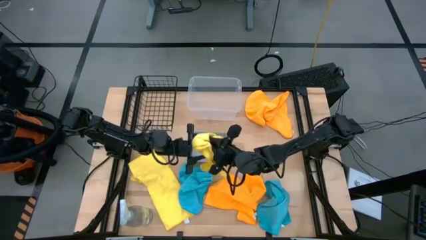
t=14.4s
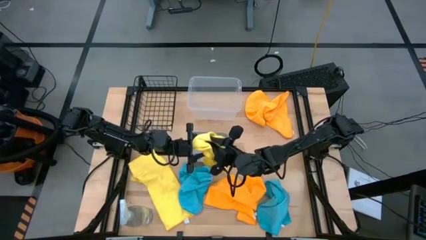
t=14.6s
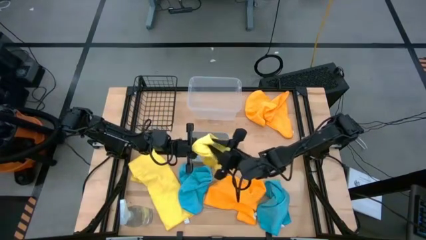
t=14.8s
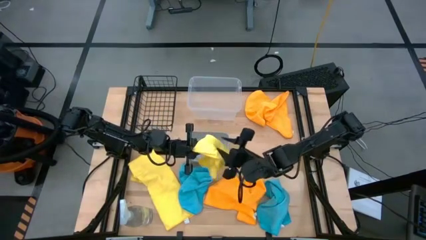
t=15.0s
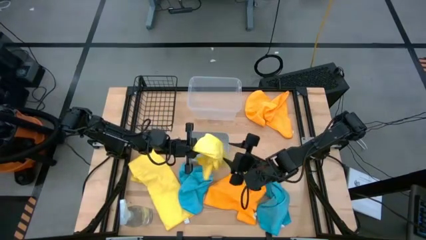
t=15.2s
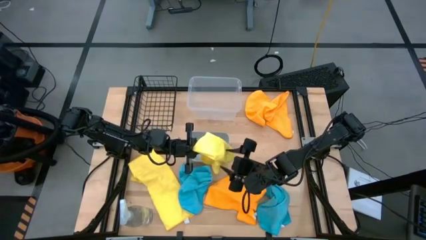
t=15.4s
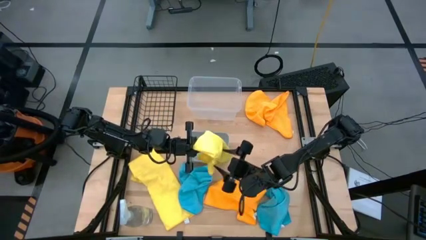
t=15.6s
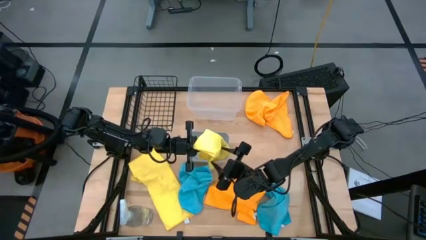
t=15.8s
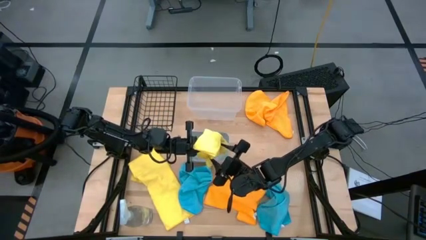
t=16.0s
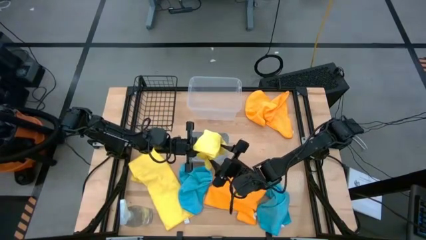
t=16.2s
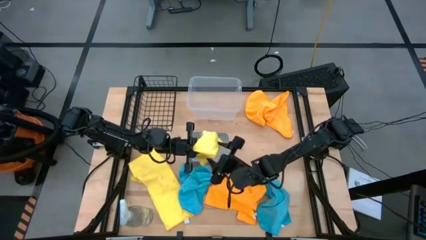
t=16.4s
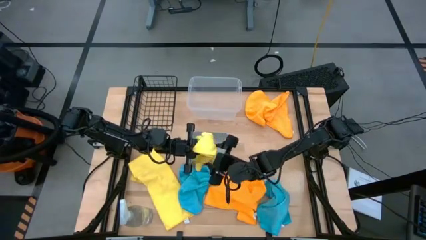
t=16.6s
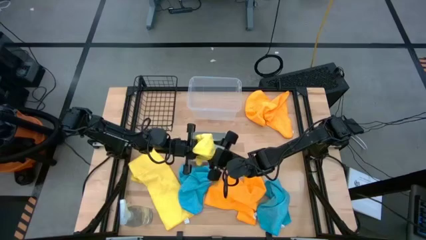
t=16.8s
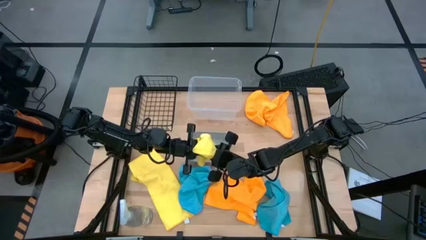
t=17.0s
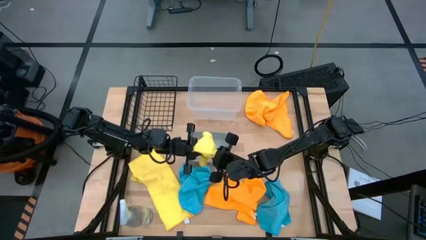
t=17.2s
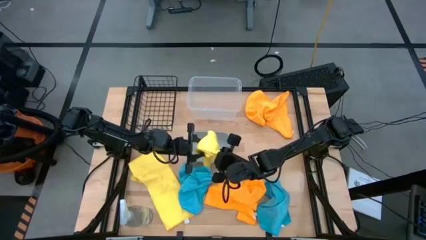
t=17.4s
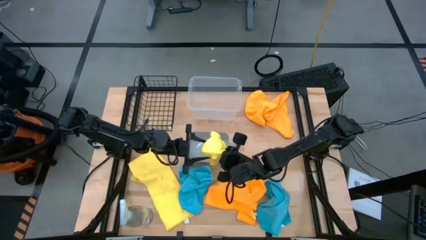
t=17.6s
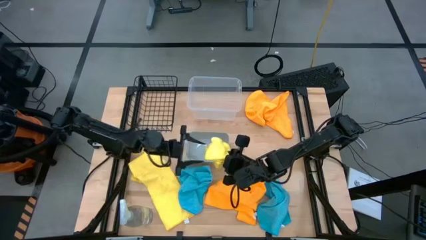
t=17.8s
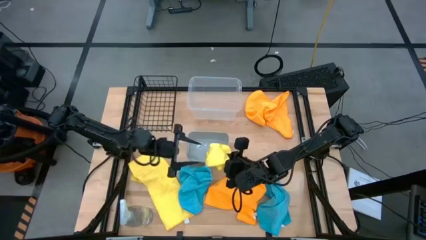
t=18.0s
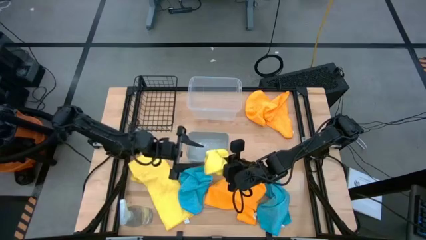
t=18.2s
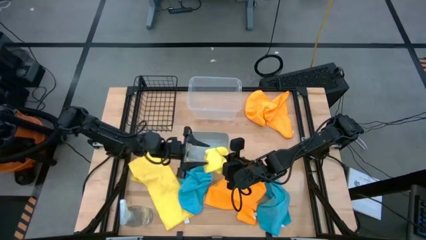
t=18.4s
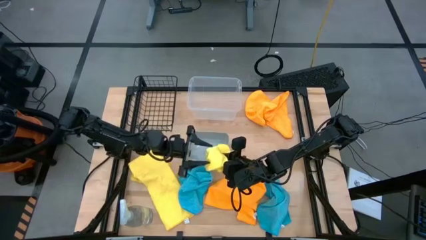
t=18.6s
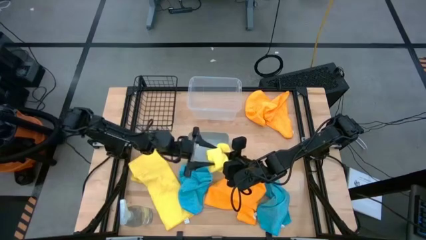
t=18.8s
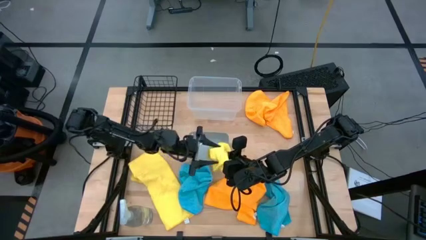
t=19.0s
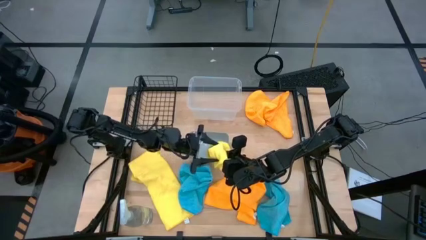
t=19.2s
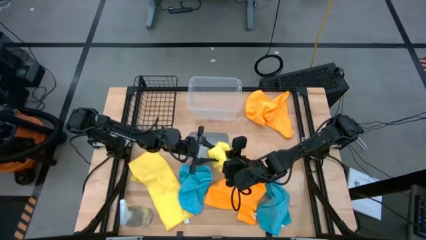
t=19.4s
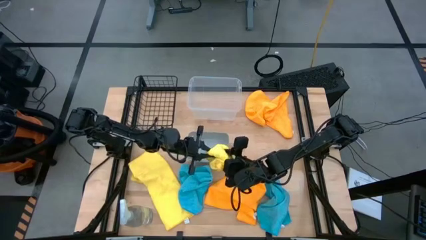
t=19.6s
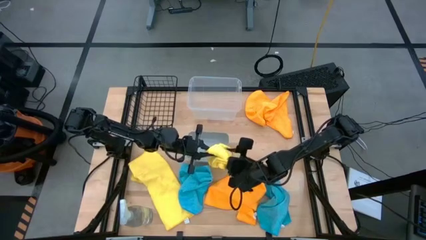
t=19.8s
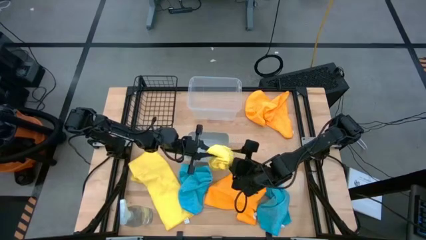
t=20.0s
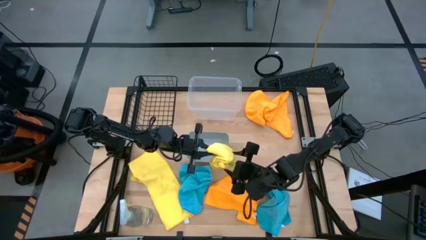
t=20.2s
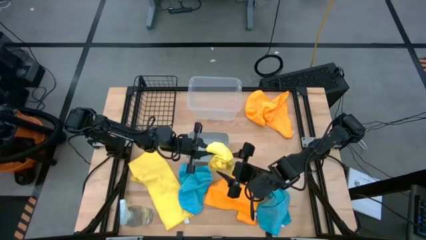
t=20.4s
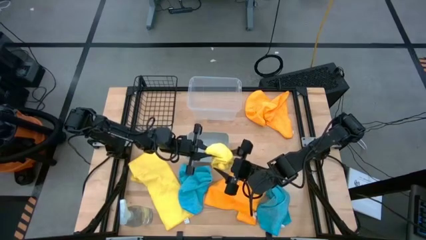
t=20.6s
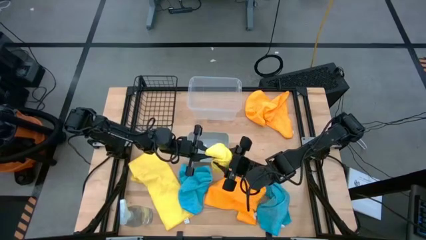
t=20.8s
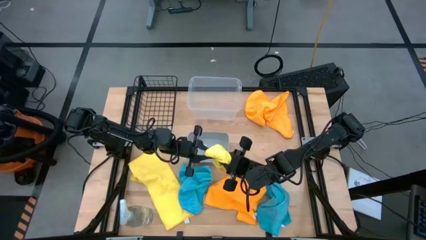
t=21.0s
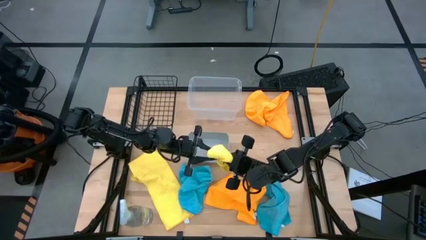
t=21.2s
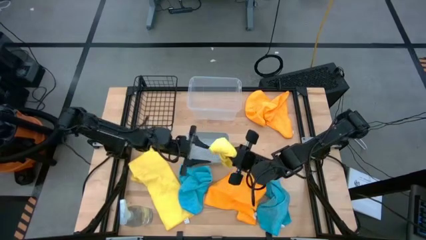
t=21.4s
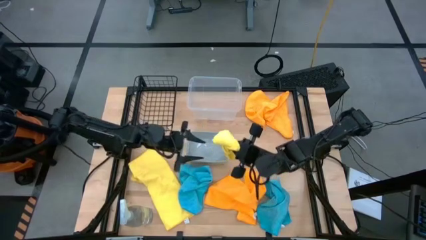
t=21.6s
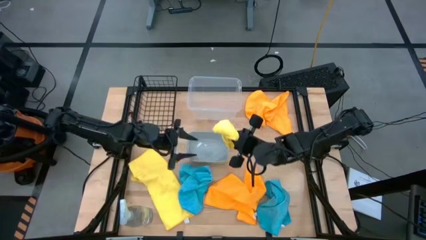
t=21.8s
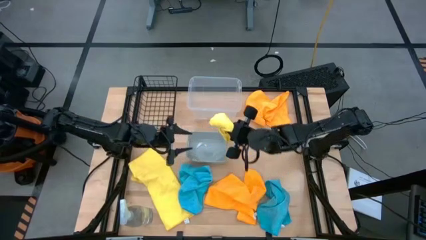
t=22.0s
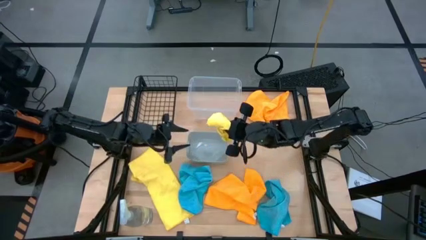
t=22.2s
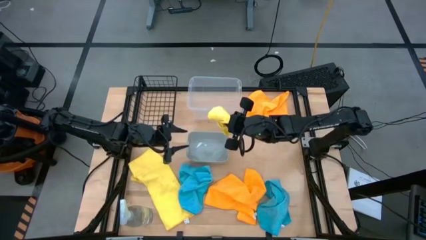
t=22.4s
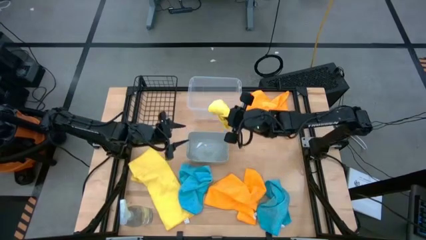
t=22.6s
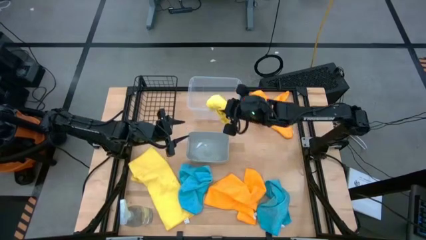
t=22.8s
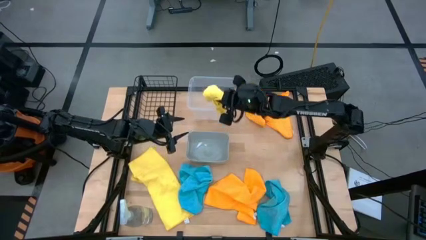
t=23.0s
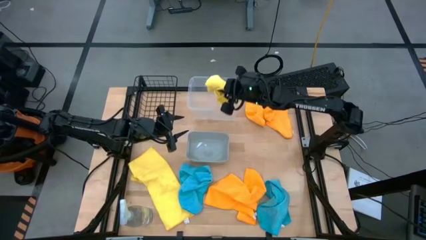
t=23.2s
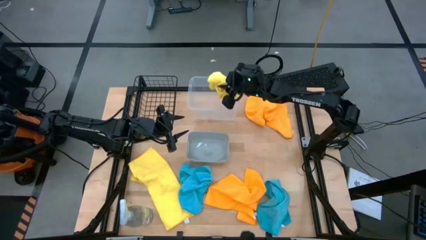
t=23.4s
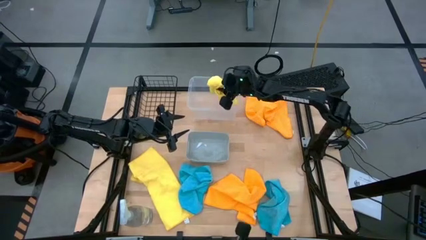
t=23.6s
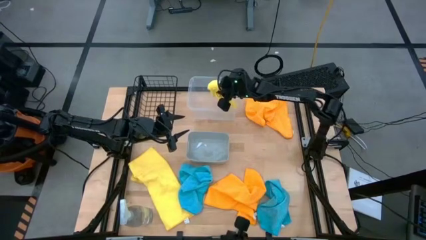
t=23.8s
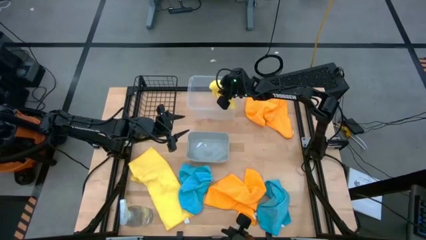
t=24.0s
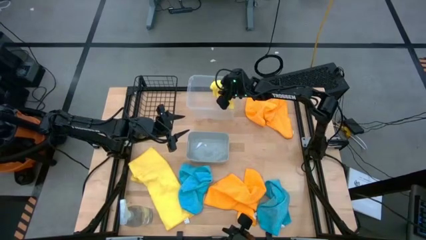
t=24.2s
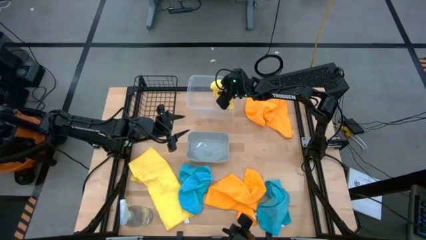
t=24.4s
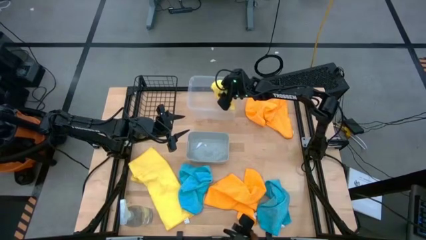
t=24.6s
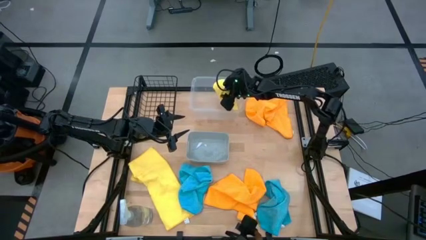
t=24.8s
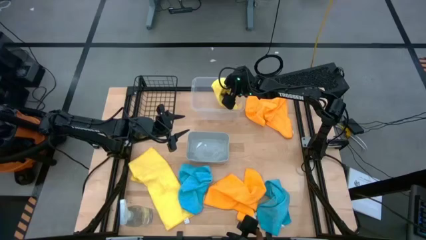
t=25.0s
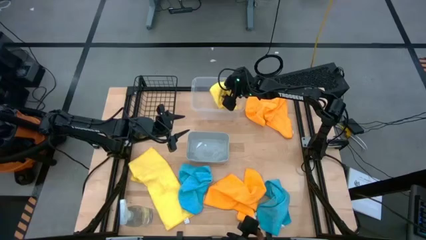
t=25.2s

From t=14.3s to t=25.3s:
Task: Sort microfiber towel by color & place in baskets
Put the right yellow microfiber cloth into the transparent bin
